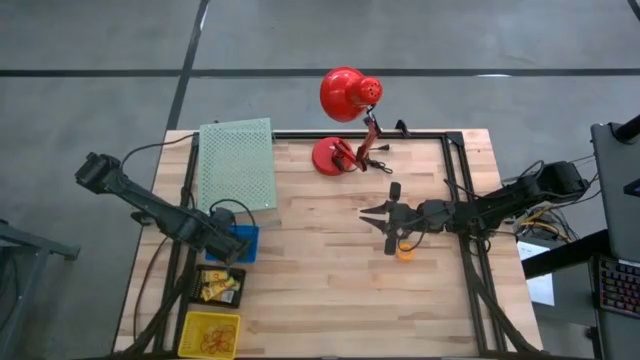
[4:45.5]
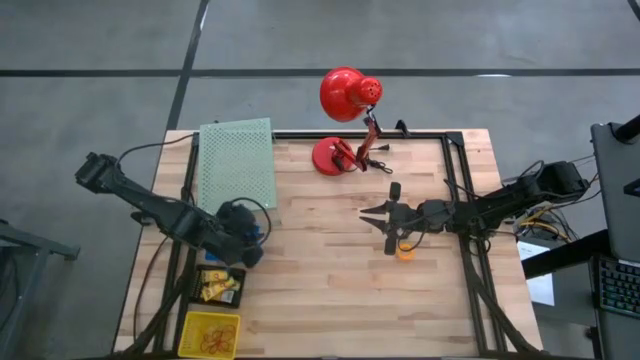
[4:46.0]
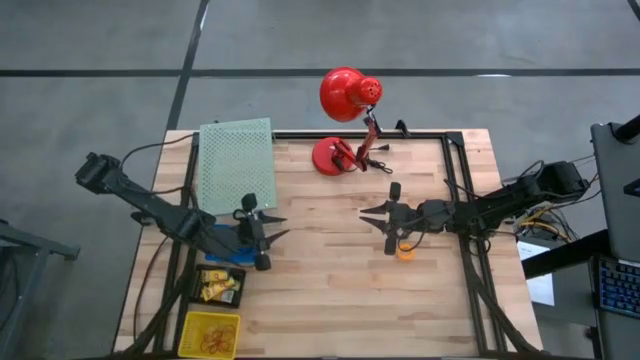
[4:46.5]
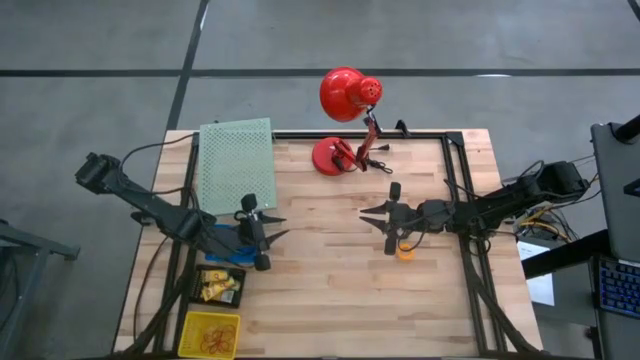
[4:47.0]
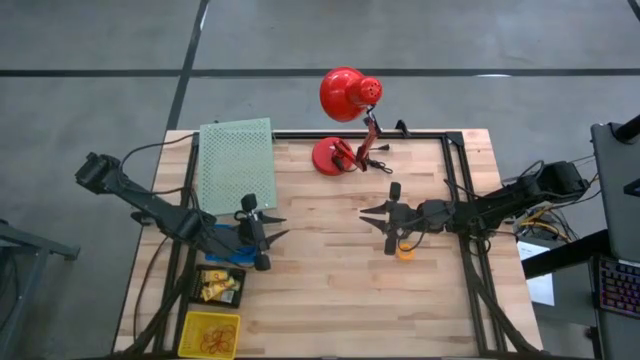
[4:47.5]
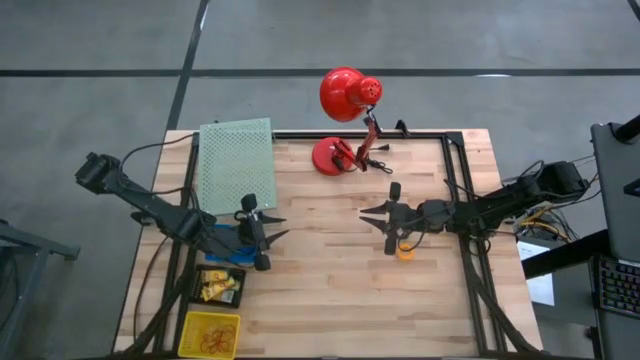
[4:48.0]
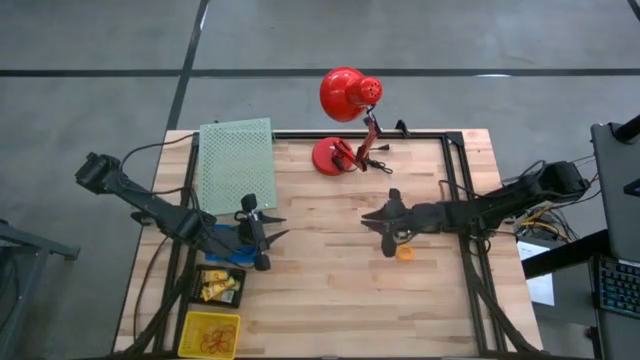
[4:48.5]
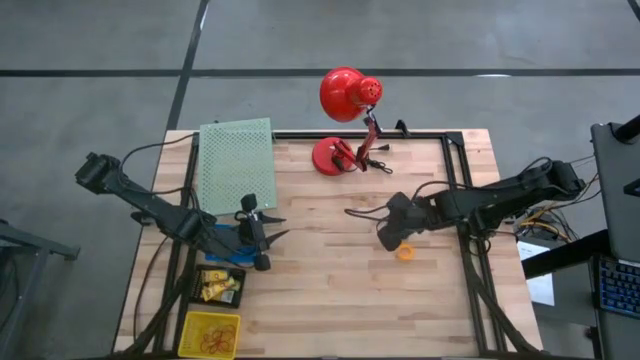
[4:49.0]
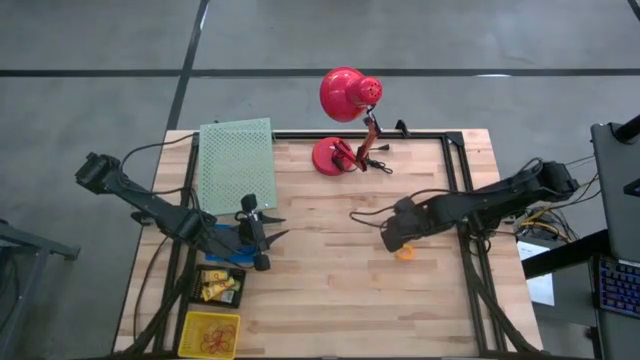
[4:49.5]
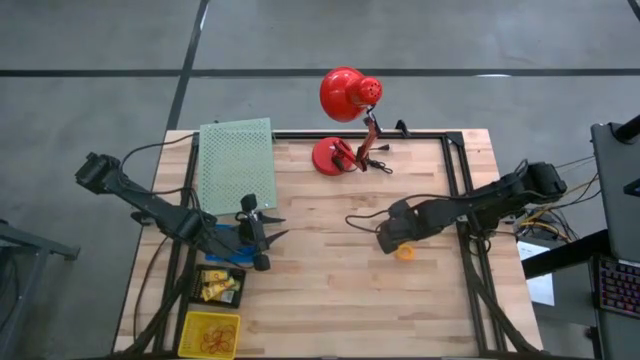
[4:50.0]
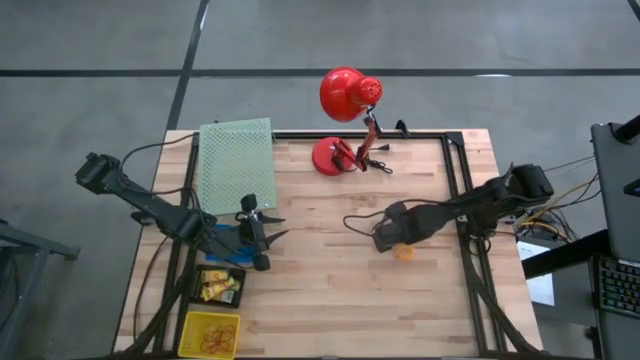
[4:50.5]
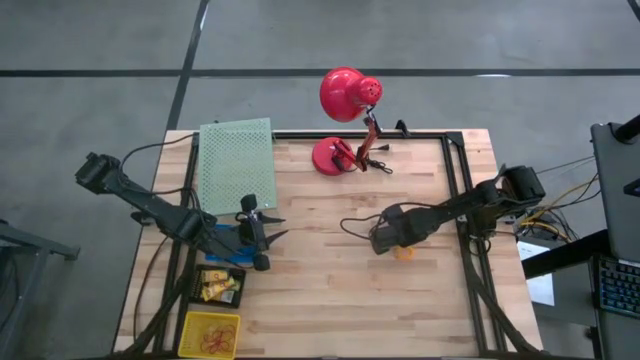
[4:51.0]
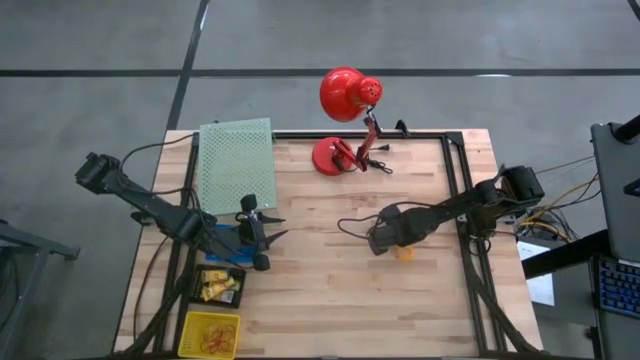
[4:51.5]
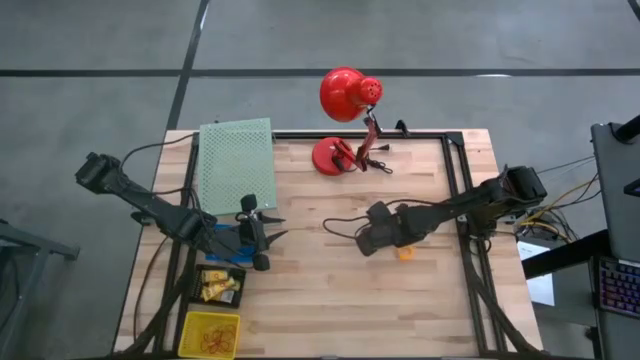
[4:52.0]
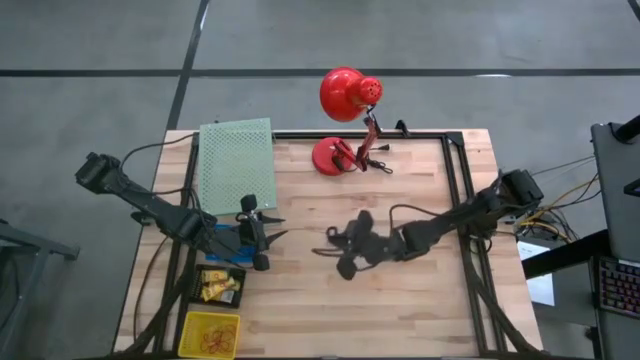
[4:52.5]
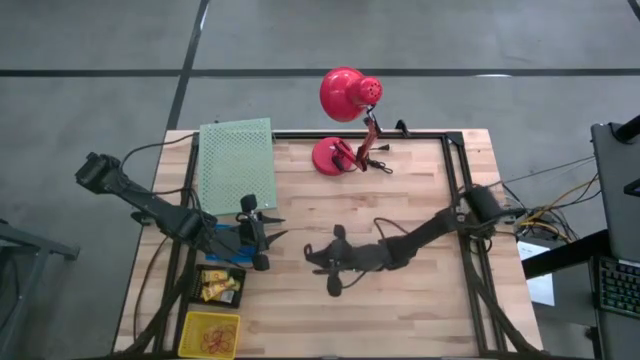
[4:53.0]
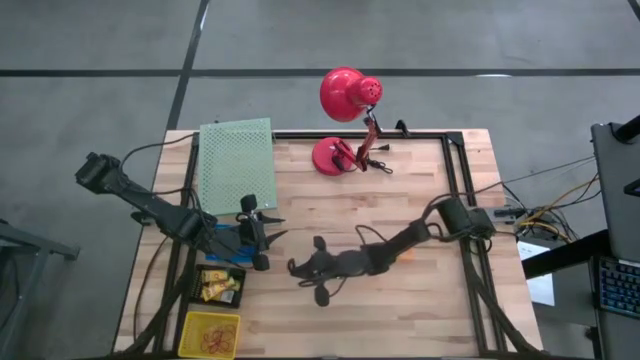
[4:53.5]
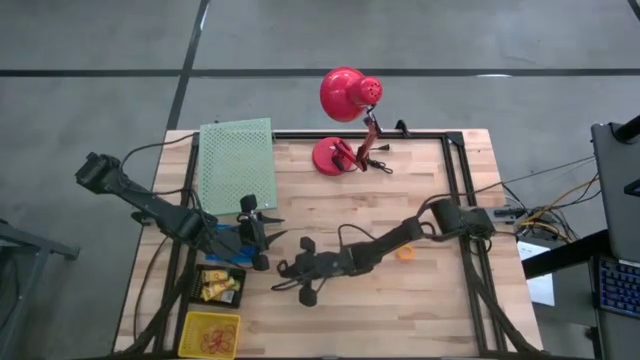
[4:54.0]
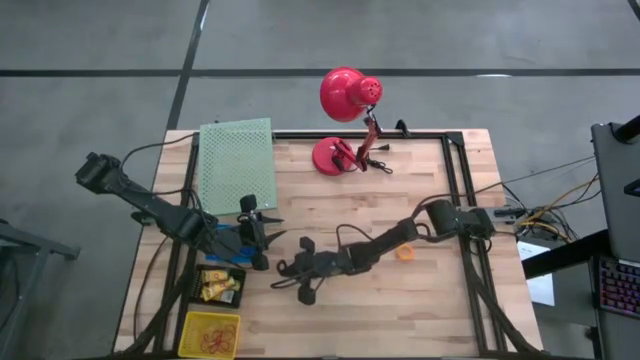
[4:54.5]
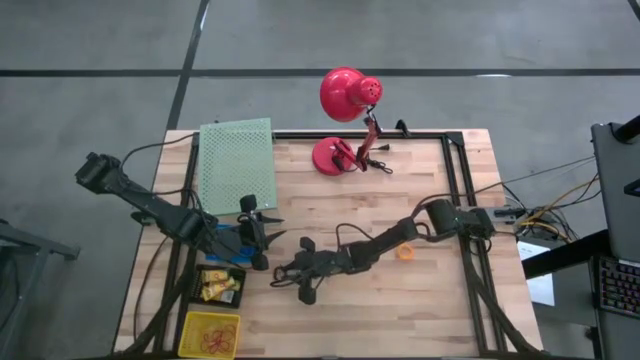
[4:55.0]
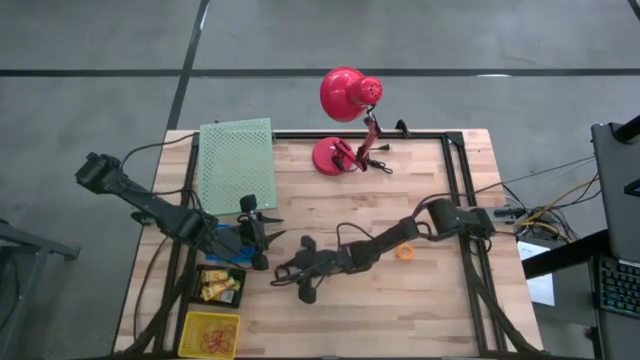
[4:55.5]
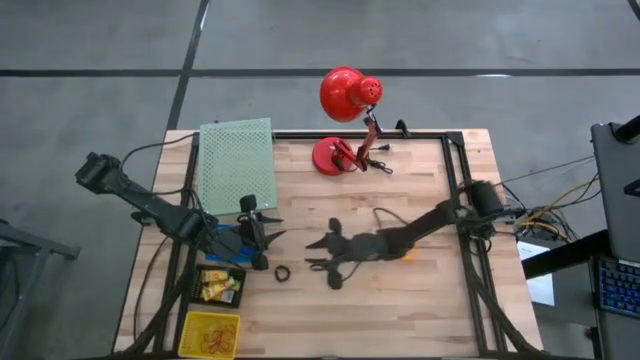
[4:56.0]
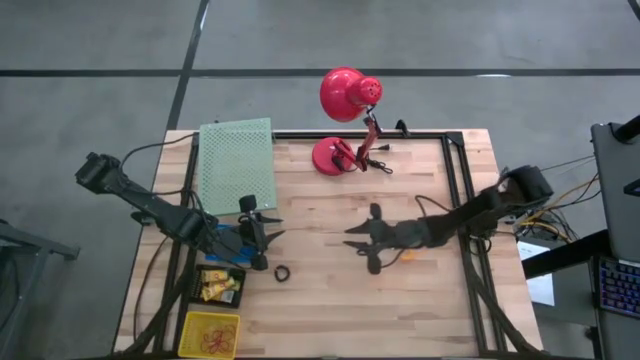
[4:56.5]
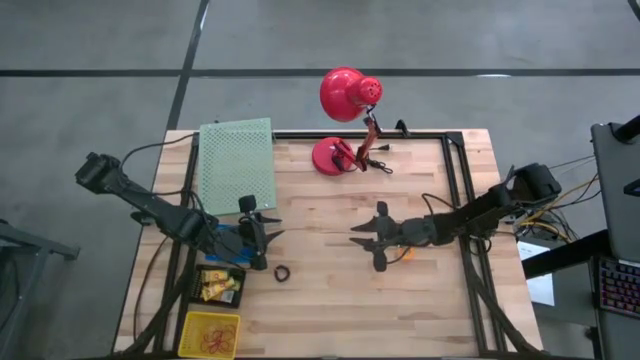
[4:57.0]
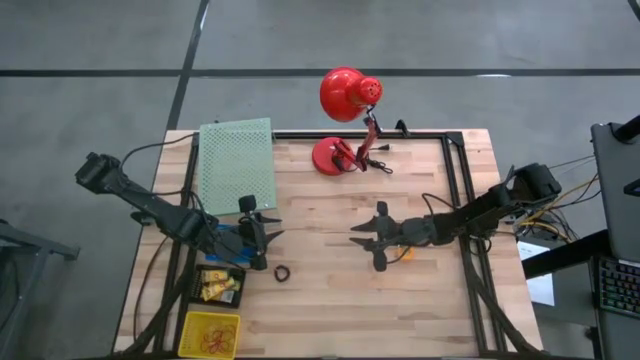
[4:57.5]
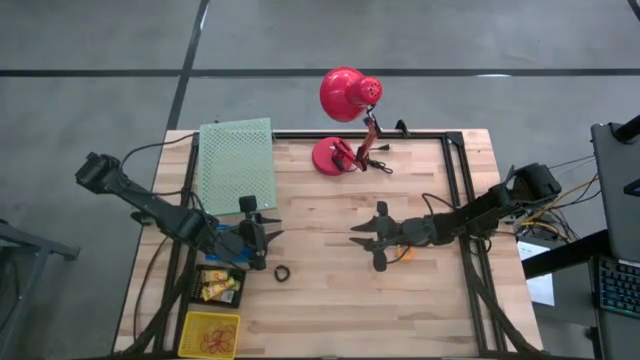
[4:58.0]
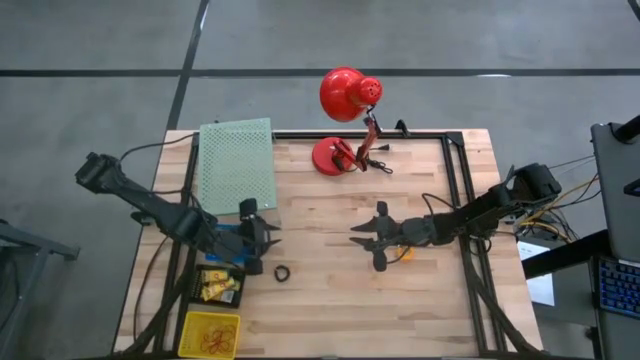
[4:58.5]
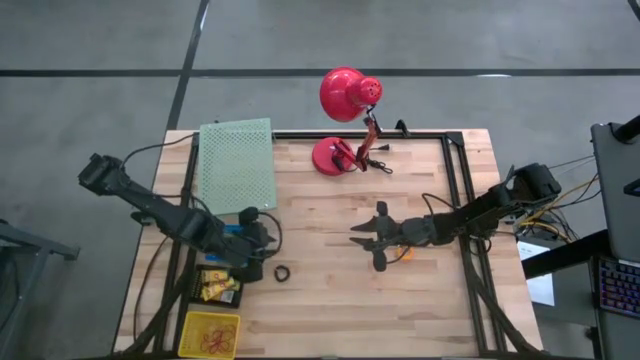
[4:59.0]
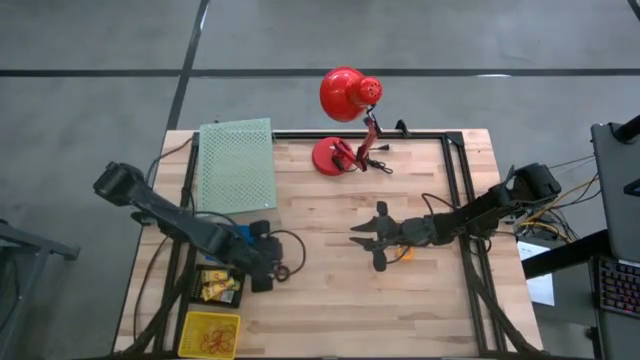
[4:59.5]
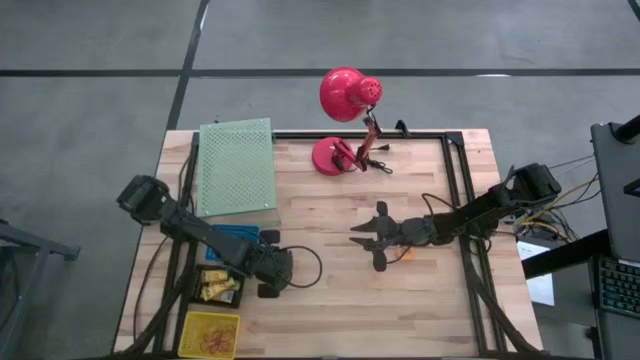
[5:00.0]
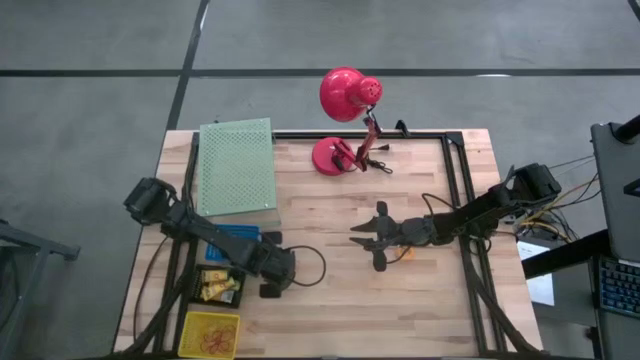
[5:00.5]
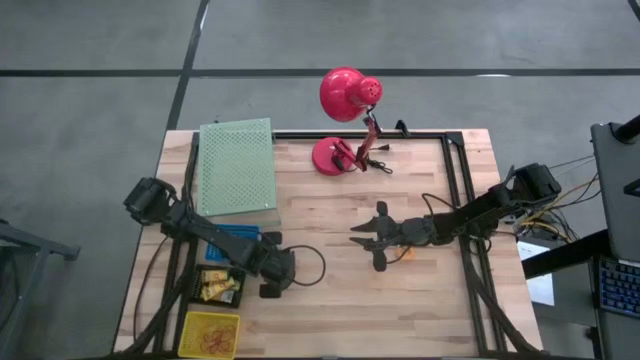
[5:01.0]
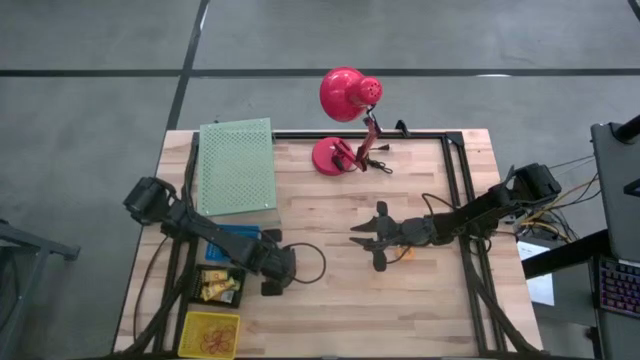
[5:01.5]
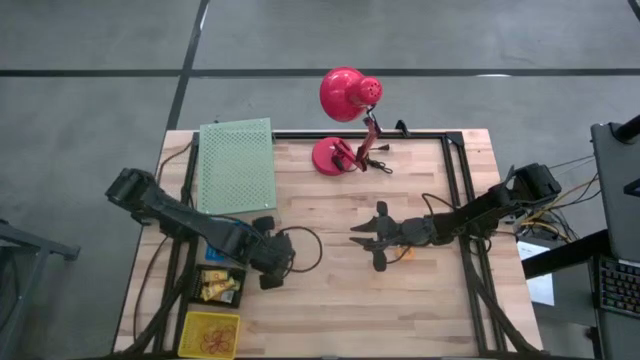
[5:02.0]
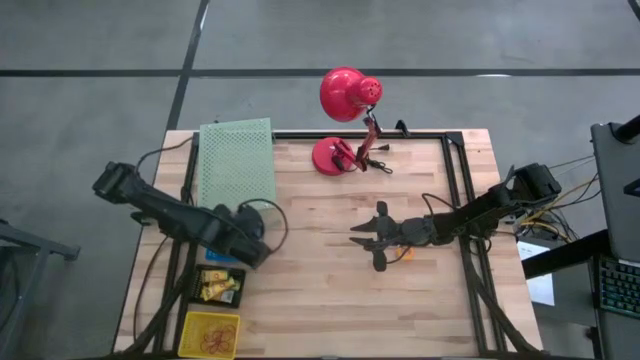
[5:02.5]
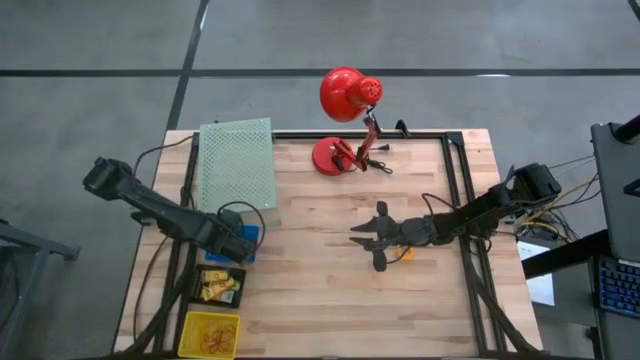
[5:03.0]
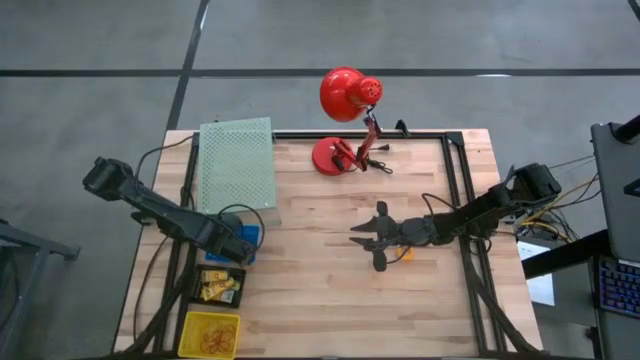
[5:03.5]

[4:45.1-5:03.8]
Task: Pick & Place Office Desk Supplies
Put the black spring rubber band into the blue bin

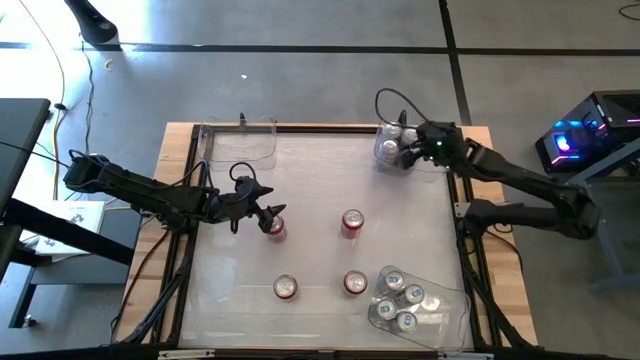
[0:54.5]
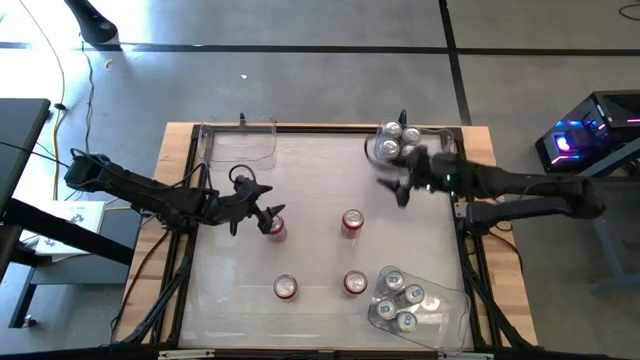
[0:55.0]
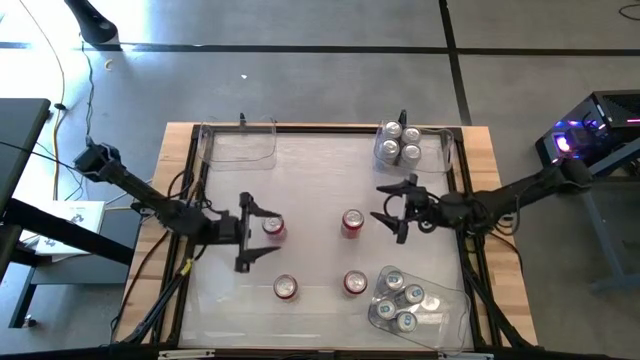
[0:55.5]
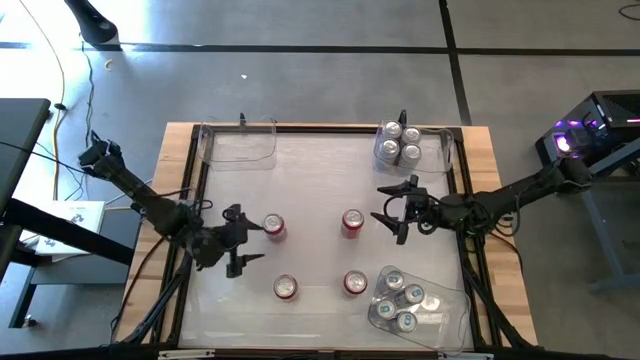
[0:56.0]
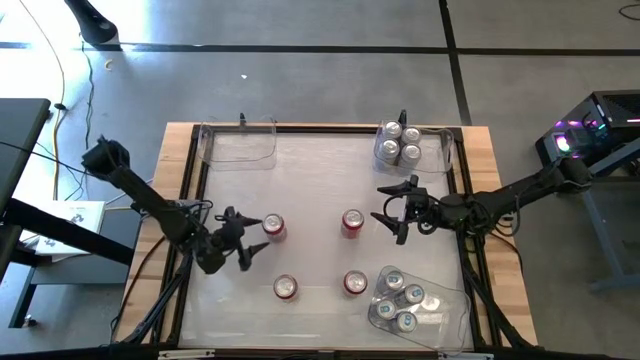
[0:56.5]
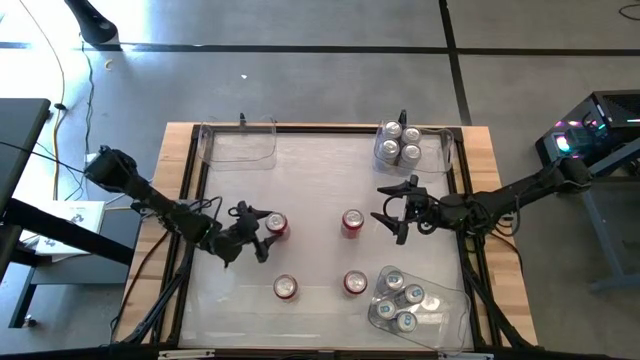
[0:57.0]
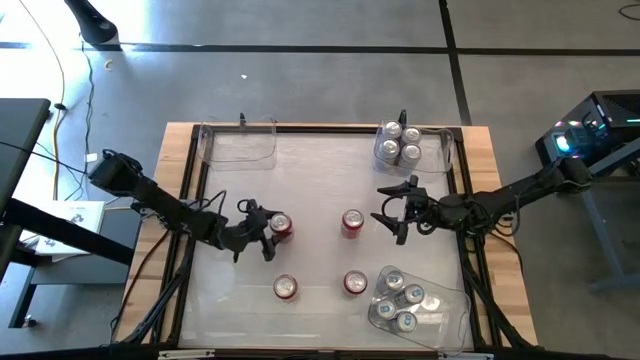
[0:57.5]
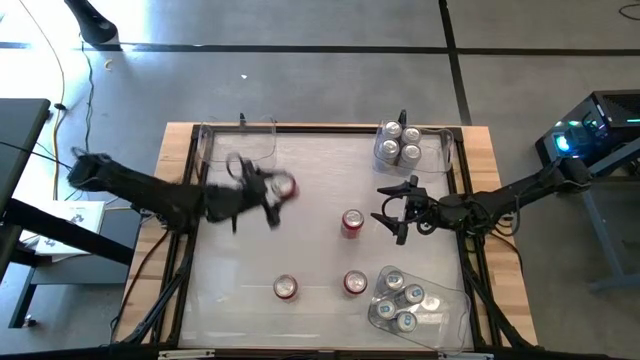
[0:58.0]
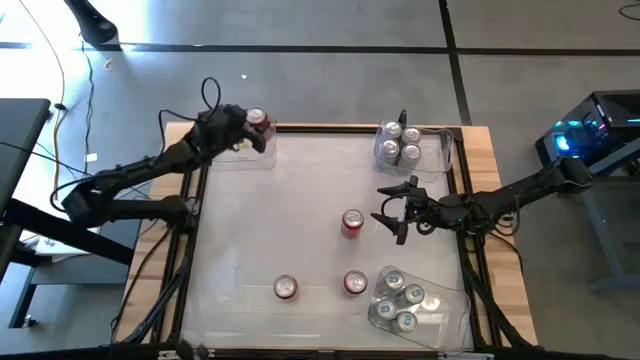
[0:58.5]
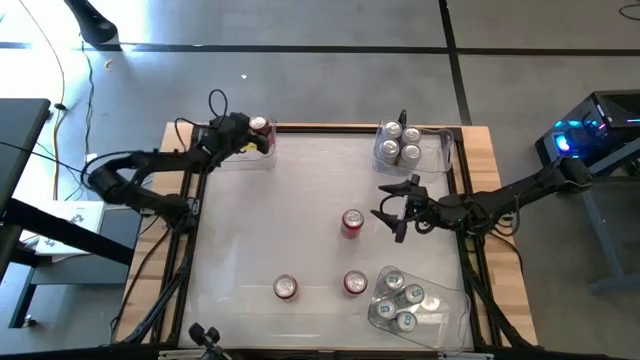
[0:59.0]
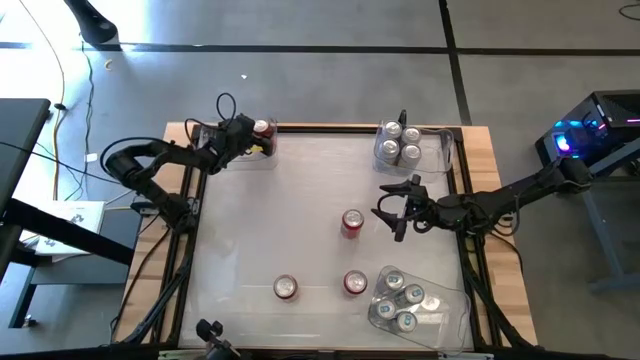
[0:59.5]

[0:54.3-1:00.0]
Task: Sort soda cans
Put the red soda can into the top left transparent bin
